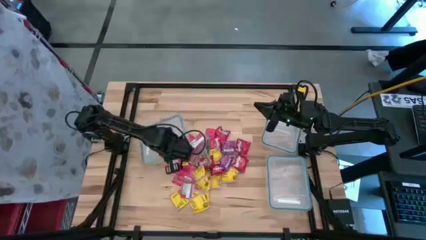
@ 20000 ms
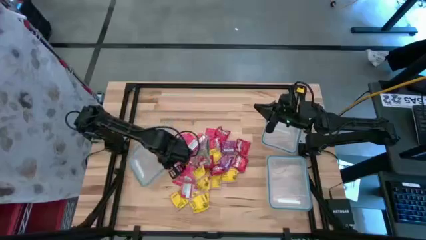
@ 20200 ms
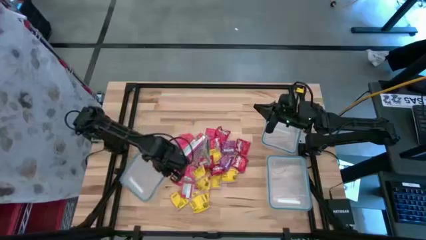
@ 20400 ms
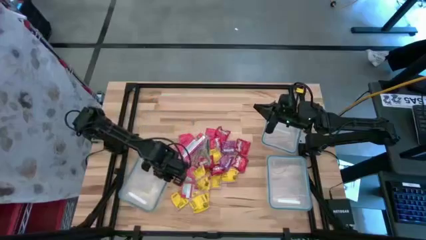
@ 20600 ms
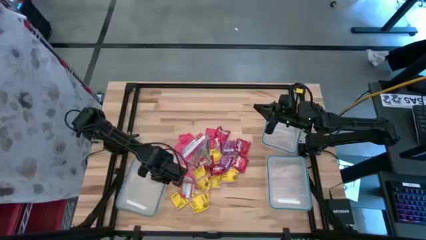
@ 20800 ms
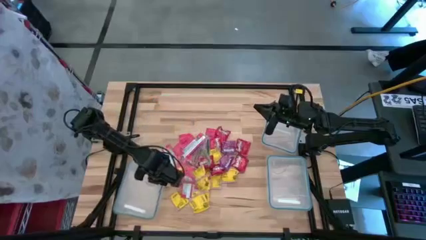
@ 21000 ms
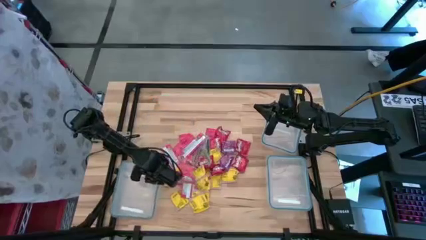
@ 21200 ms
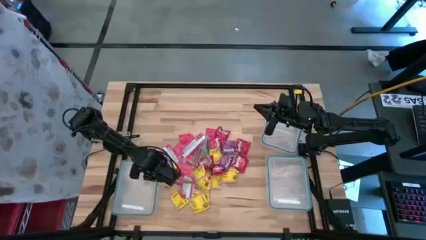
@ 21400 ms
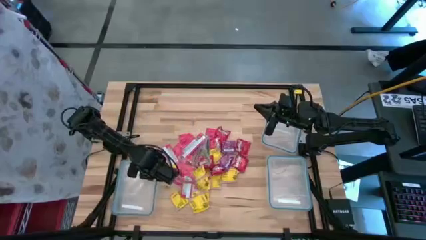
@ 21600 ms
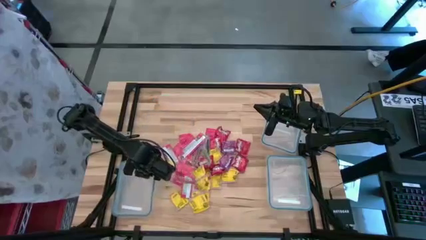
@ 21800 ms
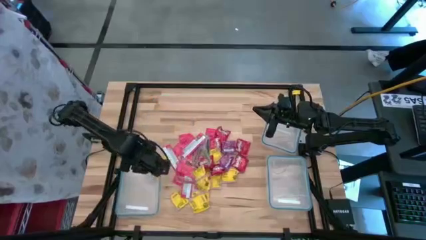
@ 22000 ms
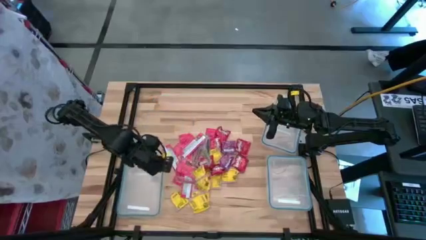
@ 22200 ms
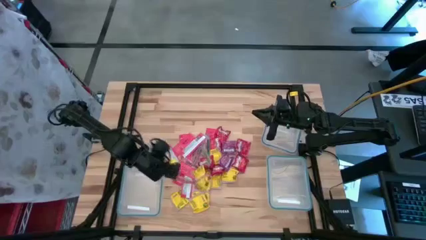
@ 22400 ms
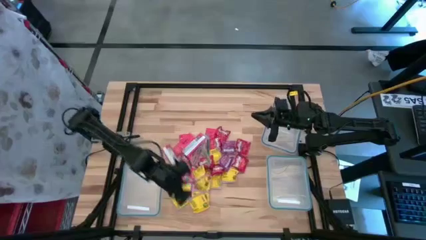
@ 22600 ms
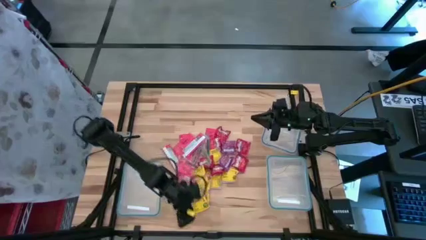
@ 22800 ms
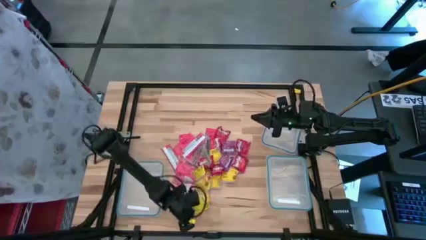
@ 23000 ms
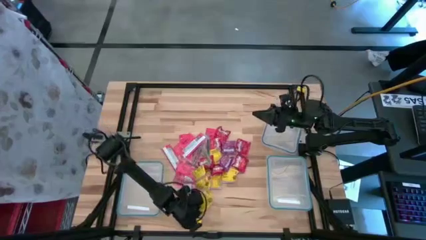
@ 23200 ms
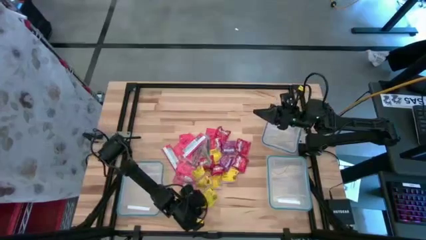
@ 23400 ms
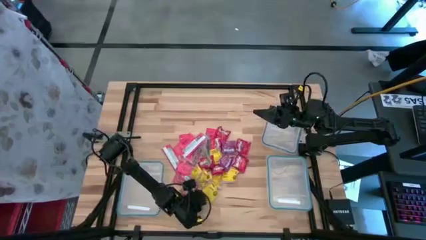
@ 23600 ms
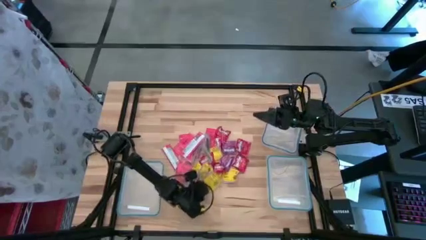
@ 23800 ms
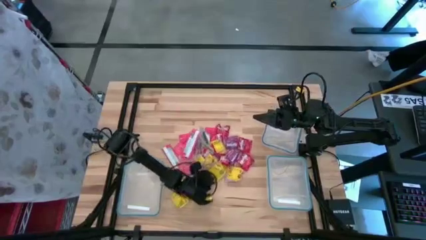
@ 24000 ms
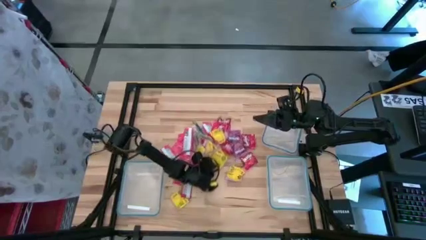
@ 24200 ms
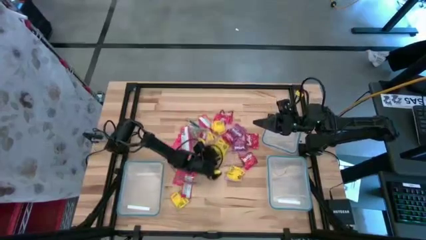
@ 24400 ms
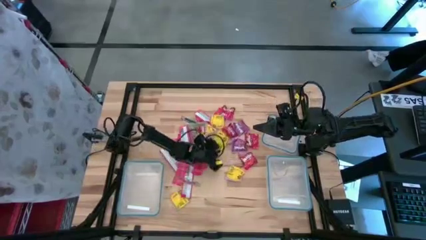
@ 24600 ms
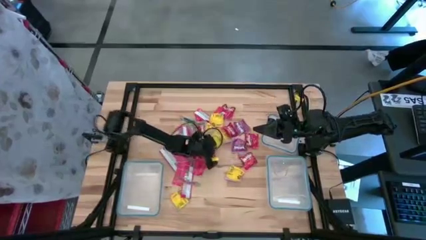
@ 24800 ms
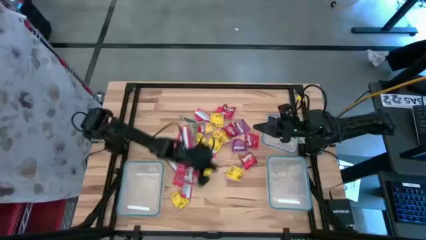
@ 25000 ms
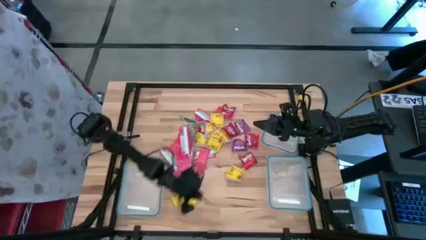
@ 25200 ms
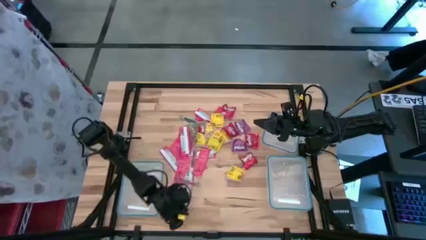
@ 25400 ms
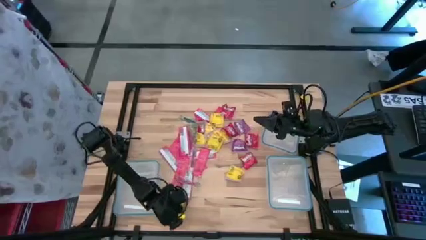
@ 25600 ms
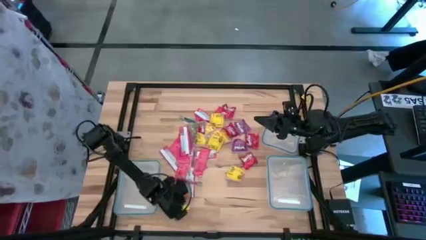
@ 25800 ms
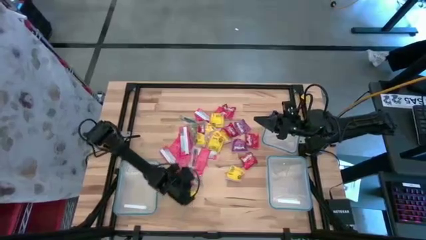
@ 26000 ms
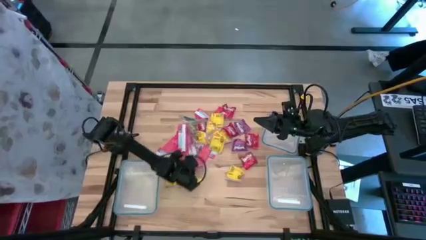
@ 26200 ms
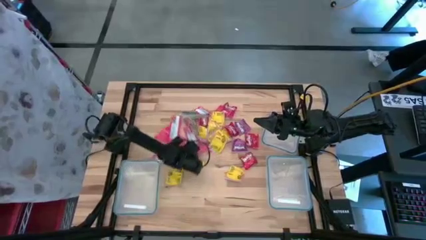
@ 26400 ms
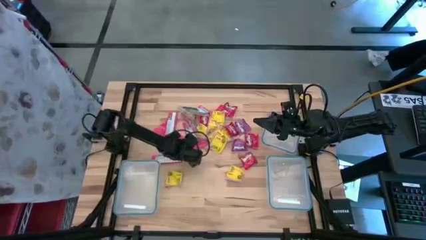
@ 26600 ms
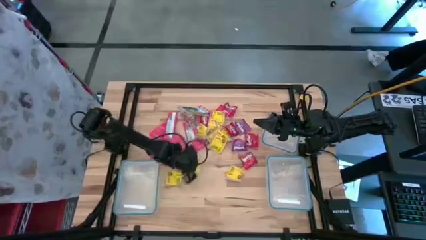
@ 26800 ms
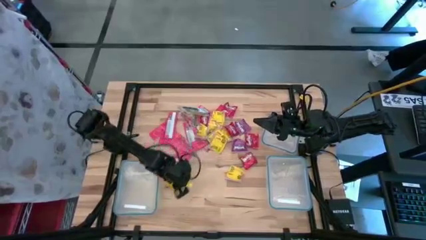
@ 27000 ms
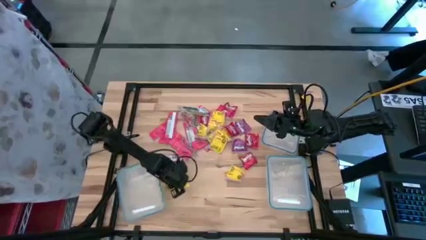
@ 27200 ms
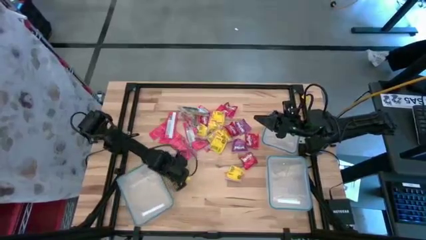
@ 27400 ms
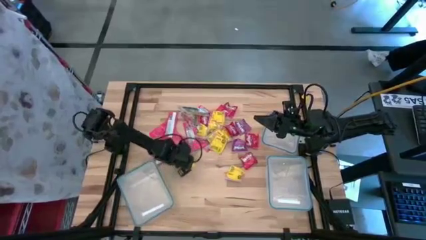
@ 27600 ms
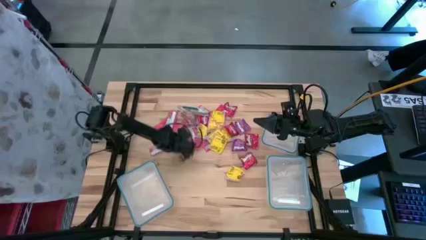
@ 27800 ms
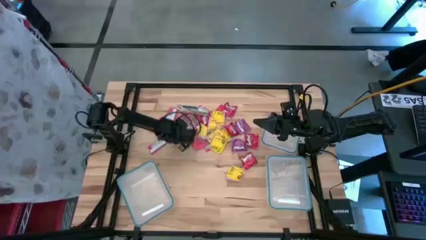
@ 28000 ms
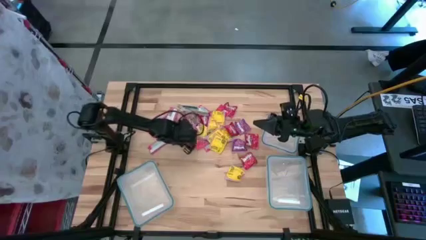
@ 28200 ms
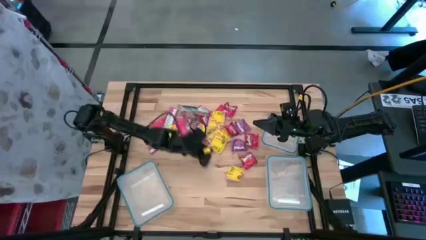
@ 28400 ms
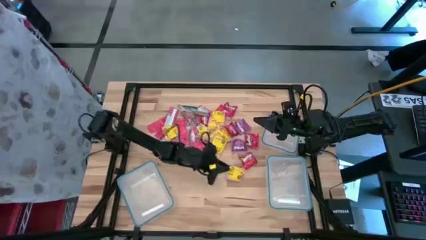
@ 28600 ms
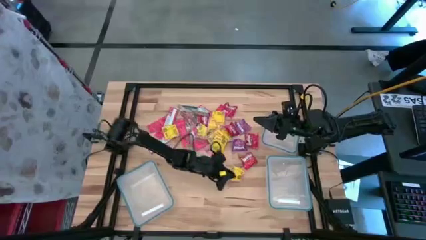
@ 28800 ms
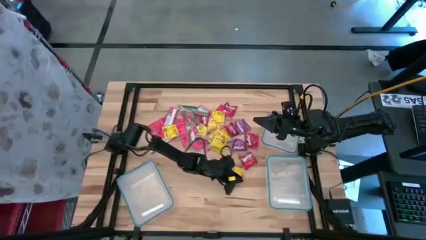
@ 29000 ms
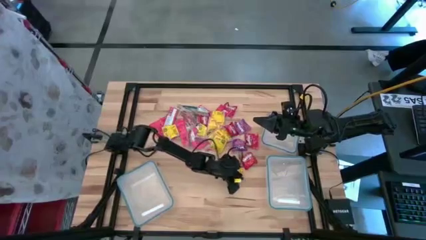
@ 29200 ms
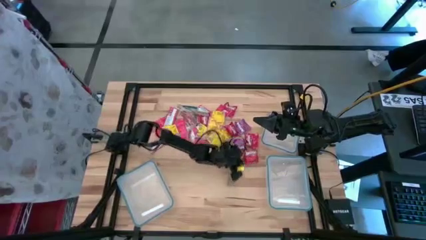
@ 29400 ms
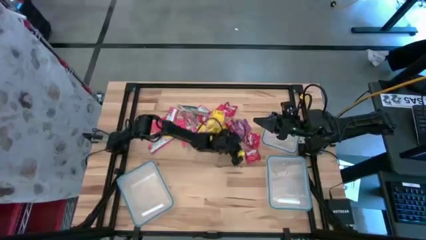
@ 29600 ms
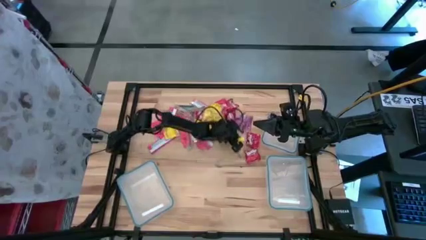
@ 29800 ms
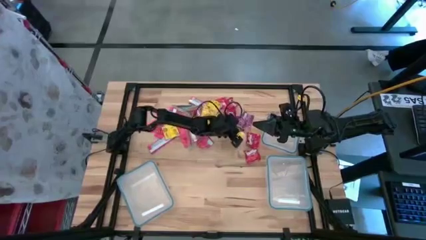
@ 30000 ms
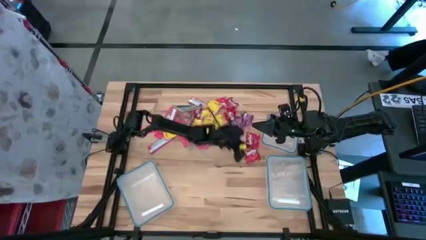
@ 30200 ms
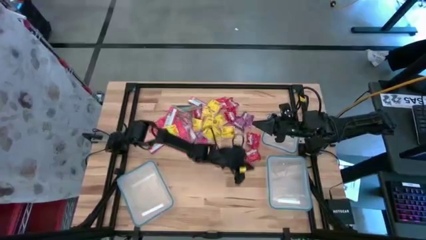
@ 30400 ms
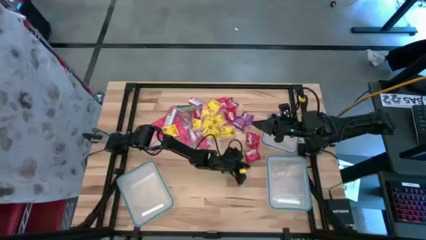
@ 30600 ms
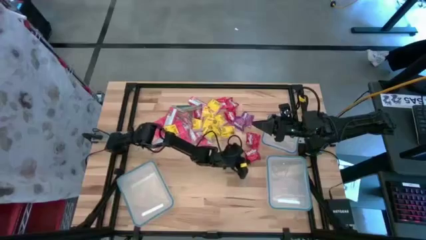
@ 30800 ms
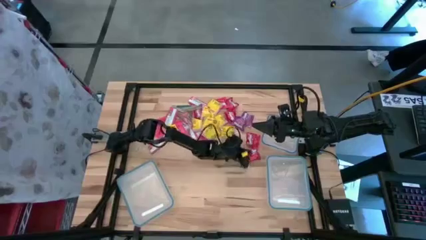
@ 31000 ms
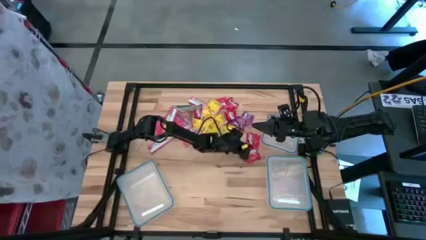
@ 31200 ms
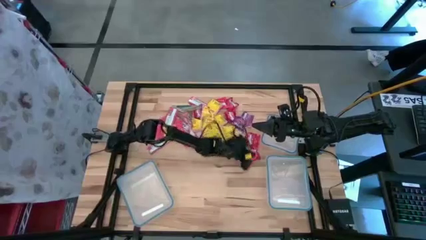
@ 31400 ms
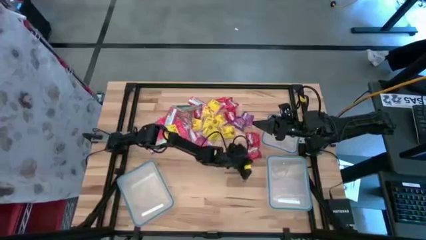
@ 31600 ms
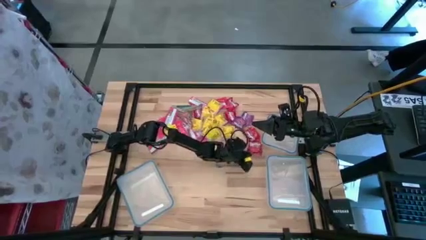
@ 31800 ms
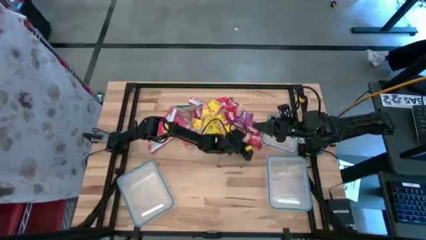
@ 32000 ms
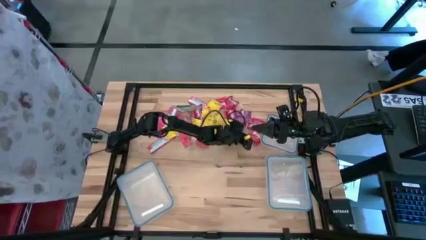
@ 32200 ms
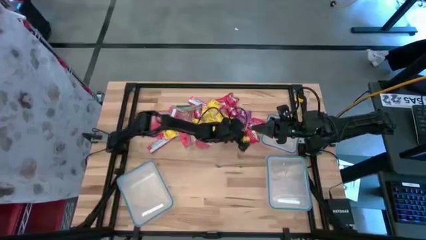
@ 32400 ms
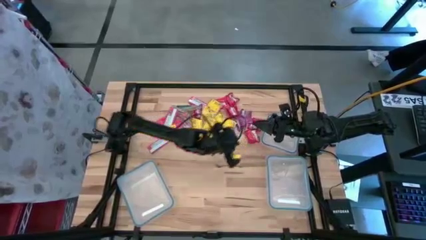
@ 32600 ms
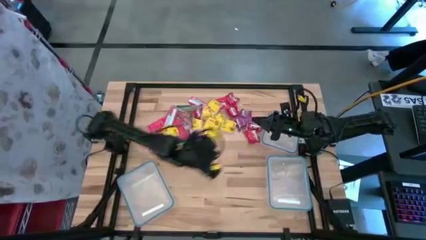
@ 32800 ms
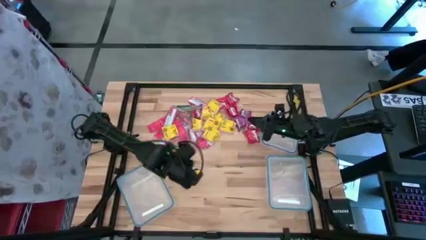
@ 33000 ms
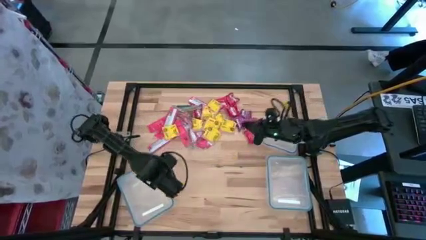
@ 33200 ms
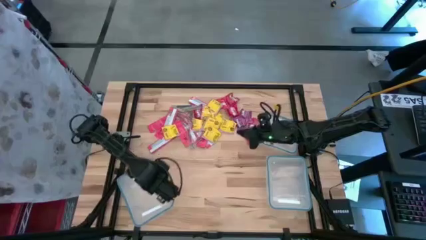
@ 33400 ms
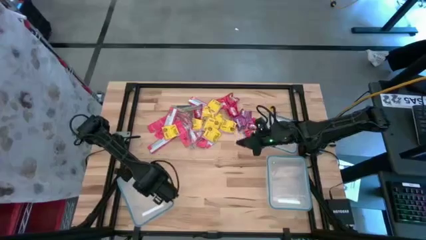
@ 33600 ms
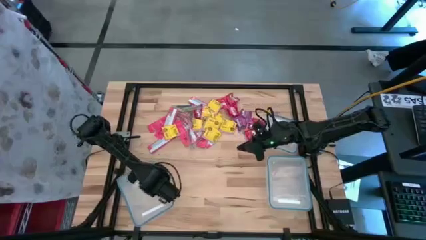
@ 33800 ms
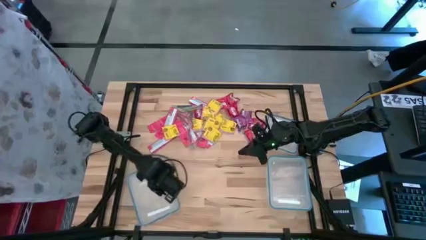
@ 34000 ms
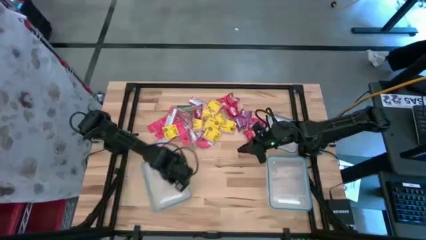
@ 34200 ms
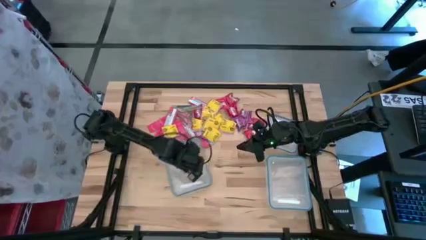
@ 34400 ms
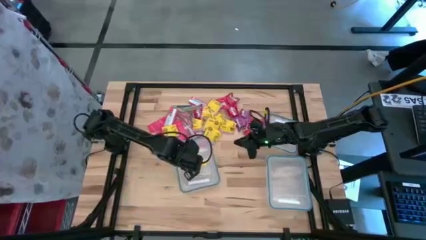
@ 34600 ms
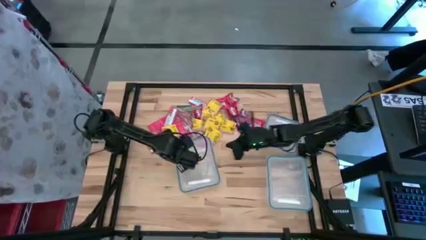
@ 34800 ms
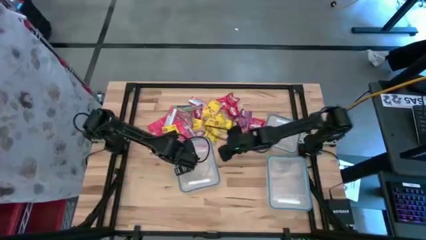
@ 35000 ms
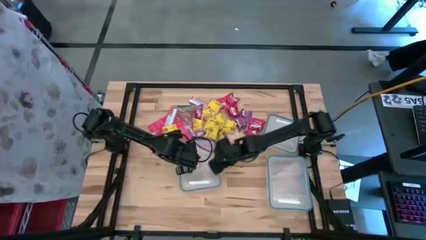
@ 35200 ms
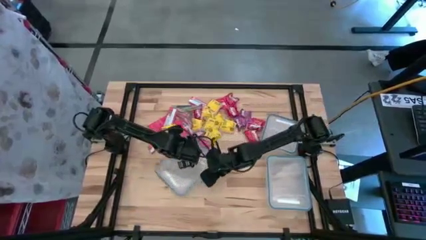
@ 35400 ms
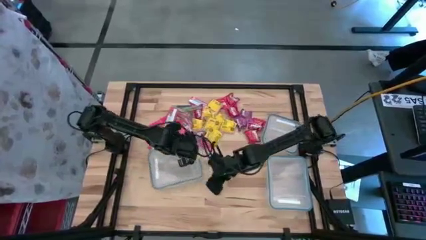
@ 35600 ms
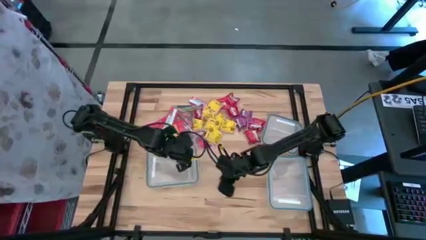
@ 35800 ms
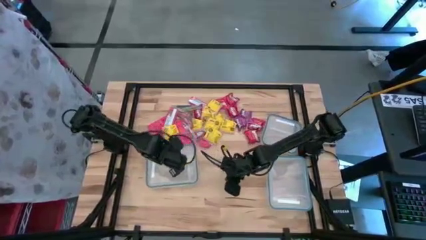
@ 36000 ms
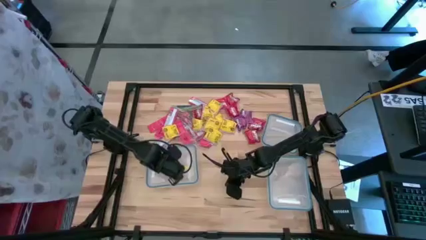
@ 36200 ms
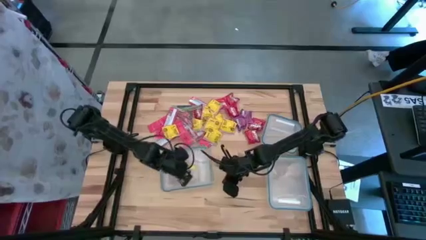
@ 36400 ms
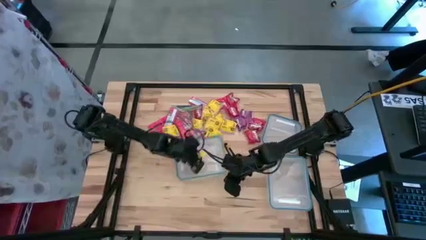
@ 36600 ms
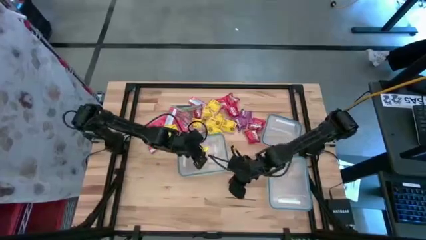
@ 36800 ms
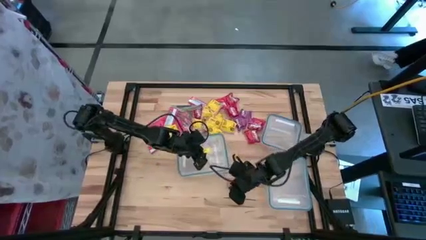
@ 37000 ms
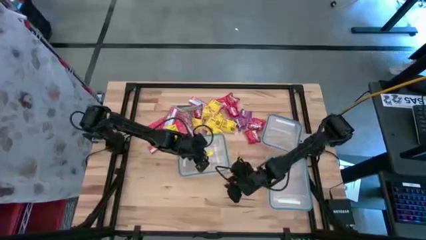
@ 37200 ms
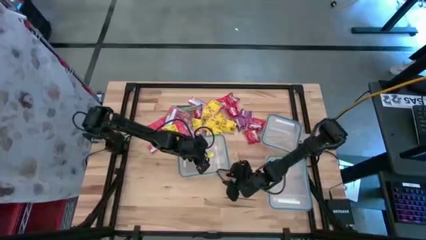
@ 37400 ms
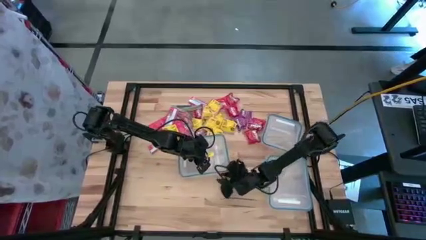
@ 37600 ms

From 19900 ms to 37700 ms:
Task: Sort candy
Open the rectangular transparent bin
